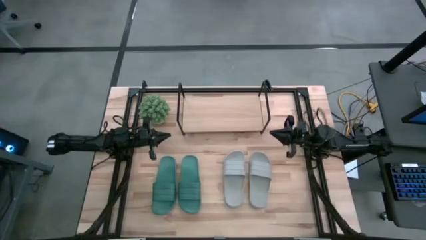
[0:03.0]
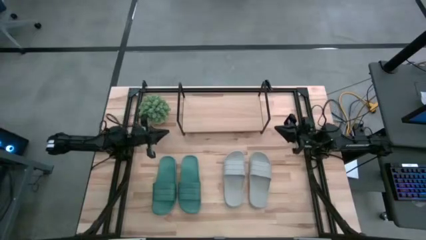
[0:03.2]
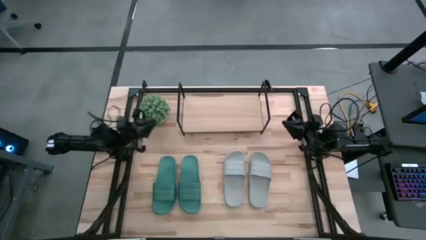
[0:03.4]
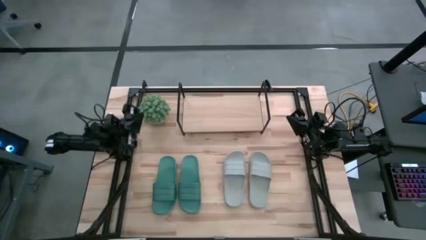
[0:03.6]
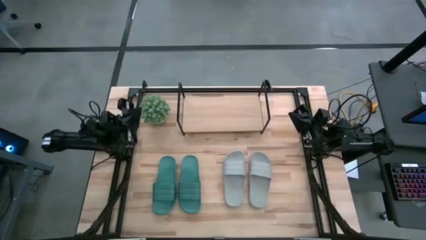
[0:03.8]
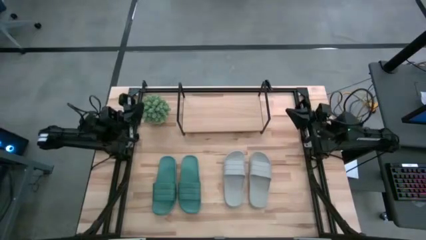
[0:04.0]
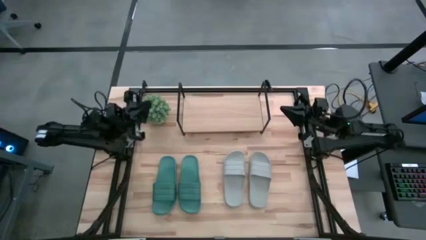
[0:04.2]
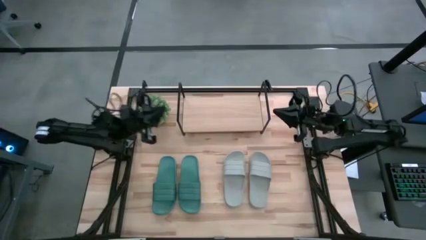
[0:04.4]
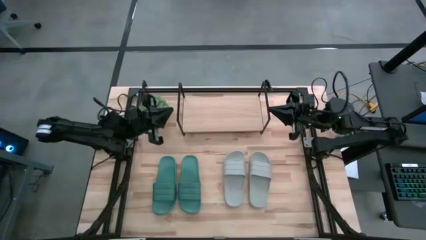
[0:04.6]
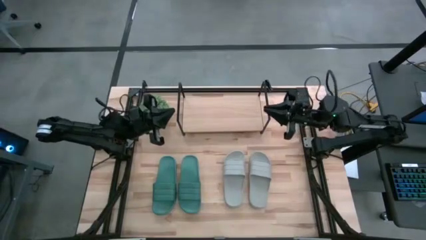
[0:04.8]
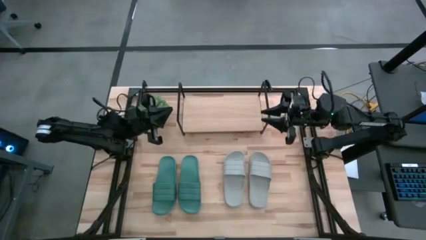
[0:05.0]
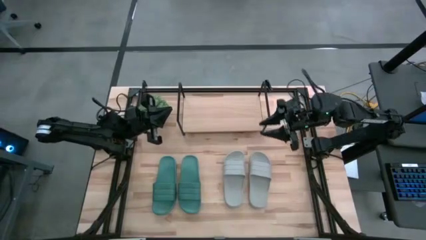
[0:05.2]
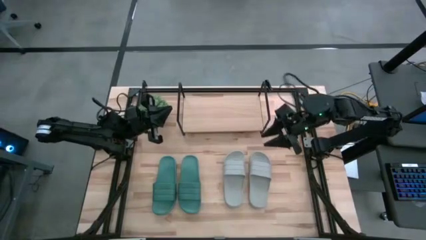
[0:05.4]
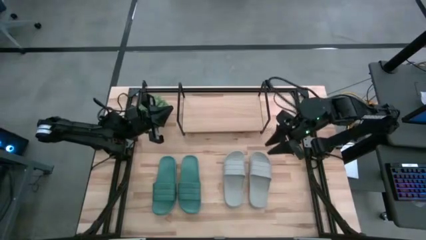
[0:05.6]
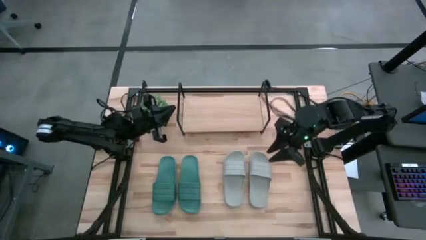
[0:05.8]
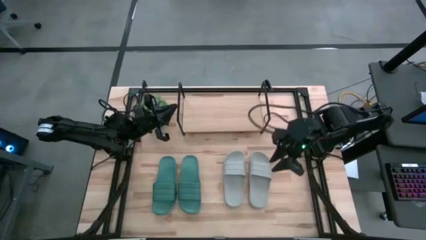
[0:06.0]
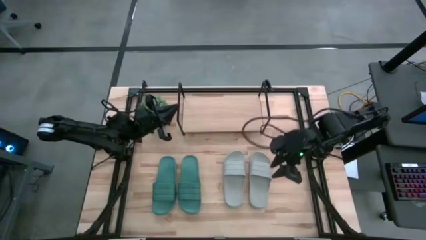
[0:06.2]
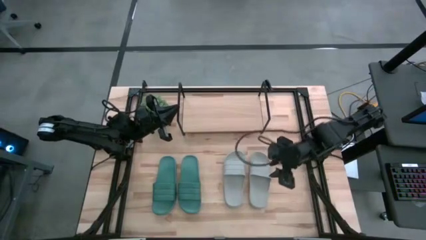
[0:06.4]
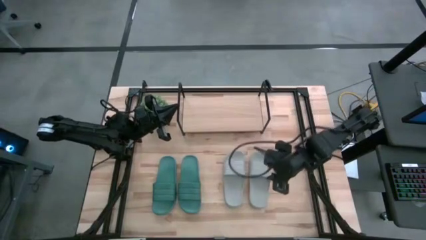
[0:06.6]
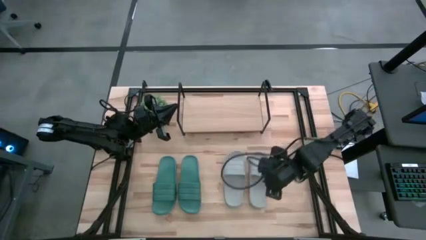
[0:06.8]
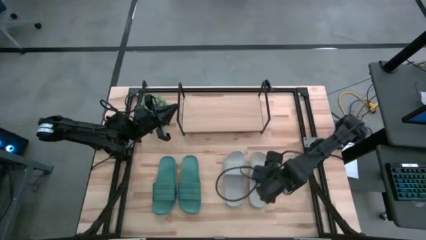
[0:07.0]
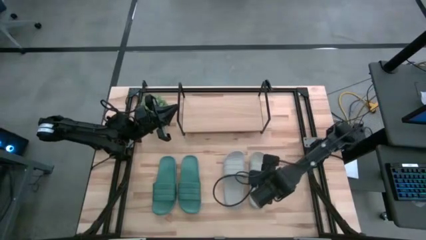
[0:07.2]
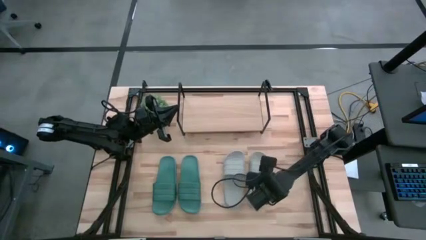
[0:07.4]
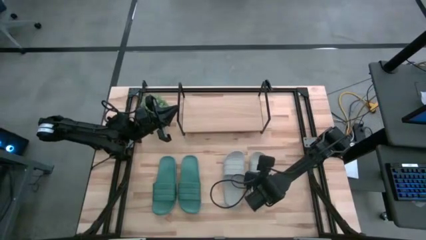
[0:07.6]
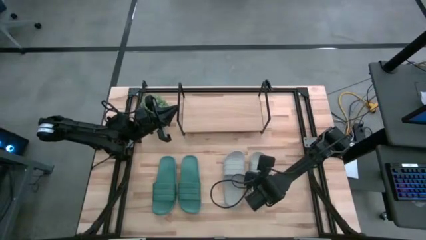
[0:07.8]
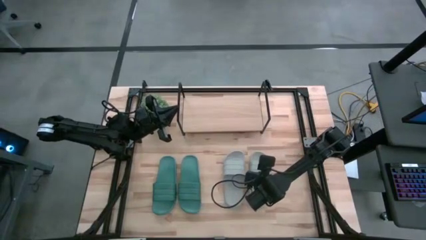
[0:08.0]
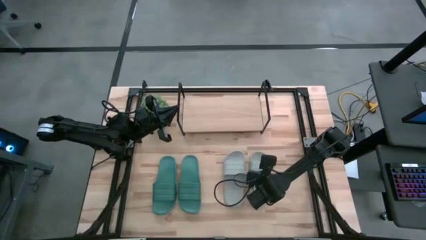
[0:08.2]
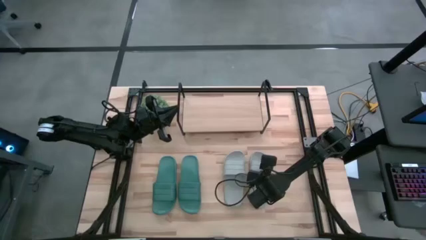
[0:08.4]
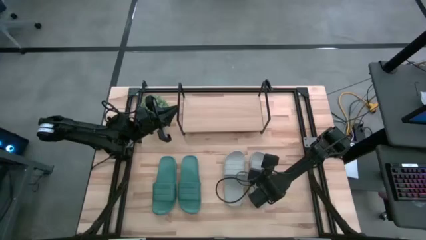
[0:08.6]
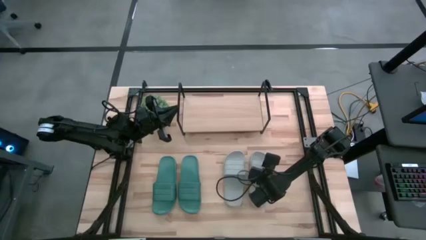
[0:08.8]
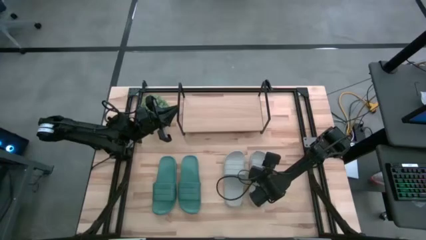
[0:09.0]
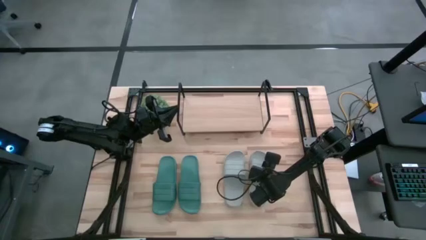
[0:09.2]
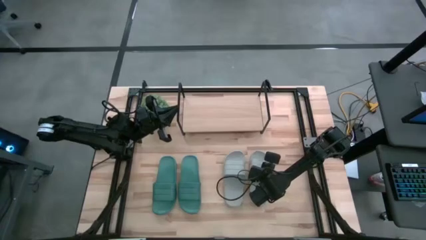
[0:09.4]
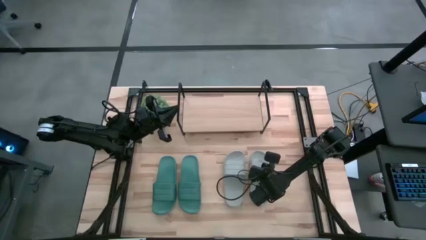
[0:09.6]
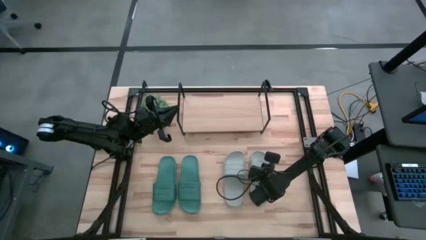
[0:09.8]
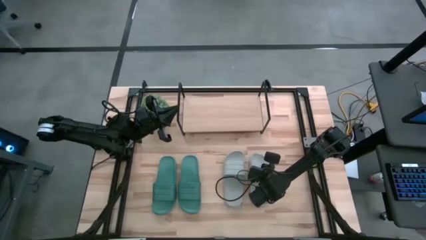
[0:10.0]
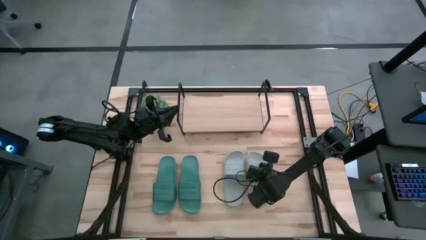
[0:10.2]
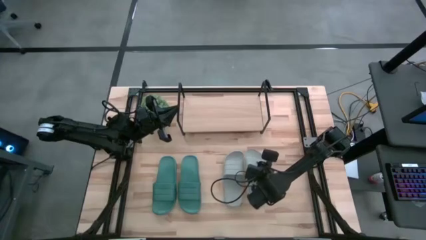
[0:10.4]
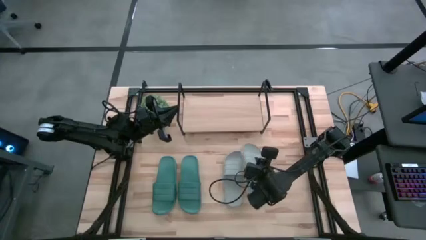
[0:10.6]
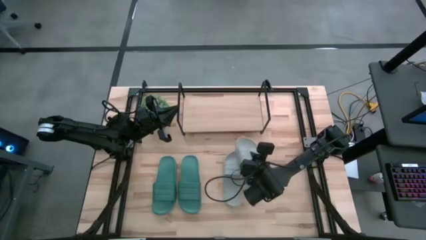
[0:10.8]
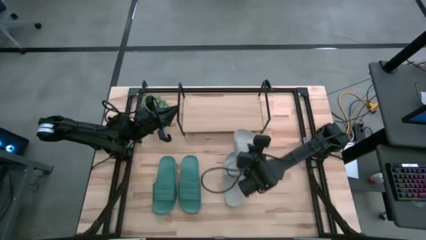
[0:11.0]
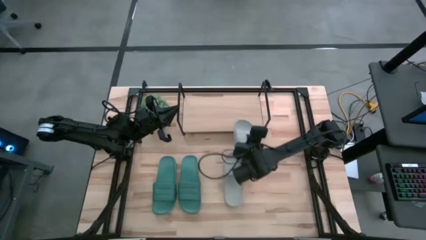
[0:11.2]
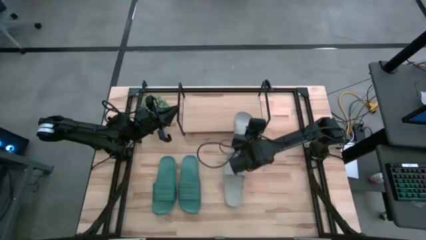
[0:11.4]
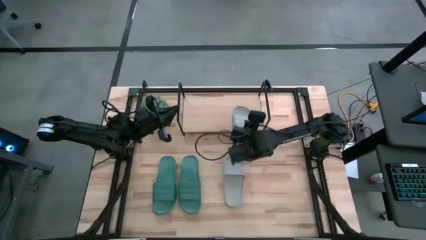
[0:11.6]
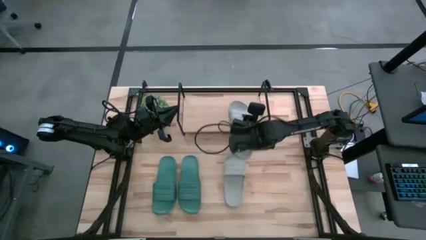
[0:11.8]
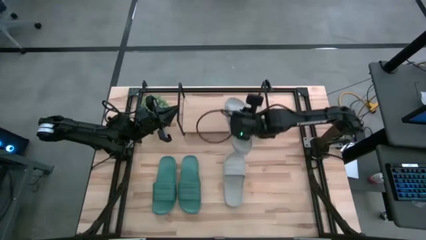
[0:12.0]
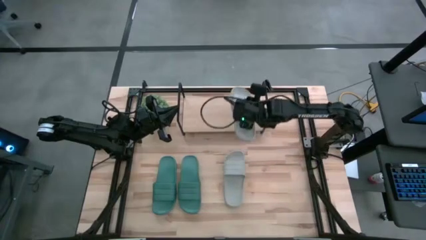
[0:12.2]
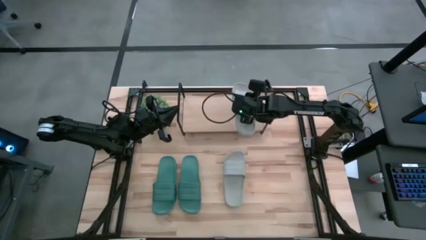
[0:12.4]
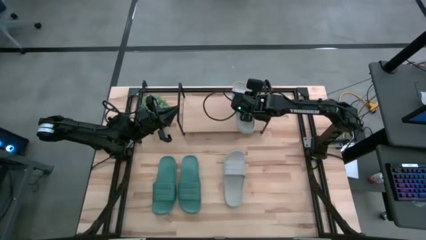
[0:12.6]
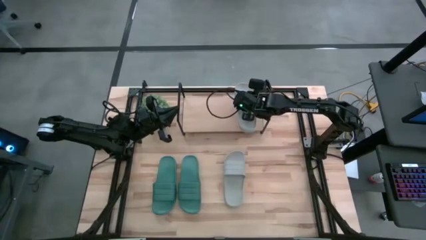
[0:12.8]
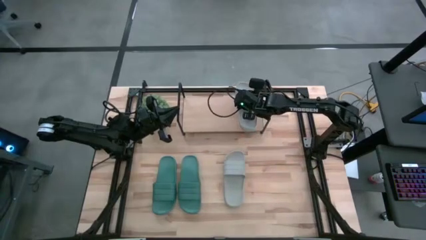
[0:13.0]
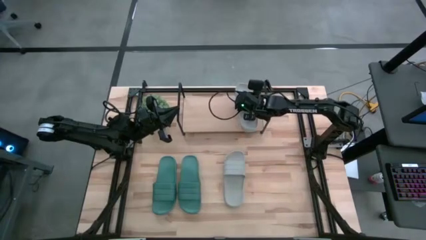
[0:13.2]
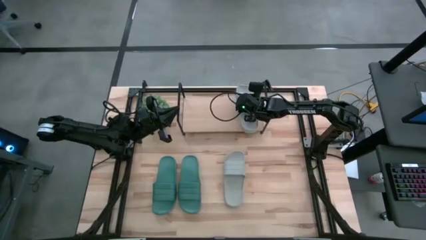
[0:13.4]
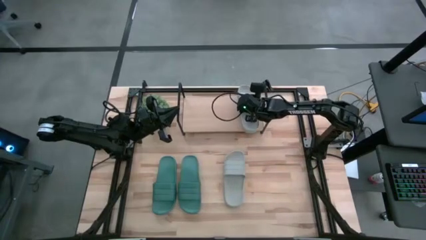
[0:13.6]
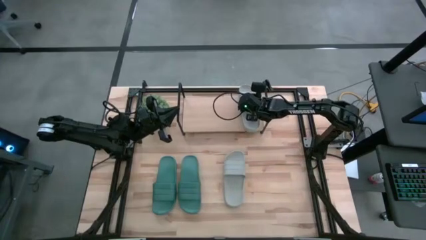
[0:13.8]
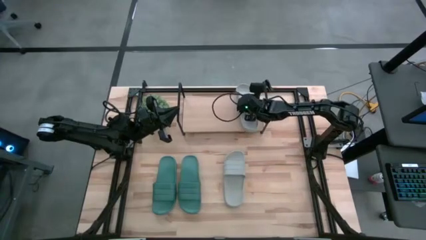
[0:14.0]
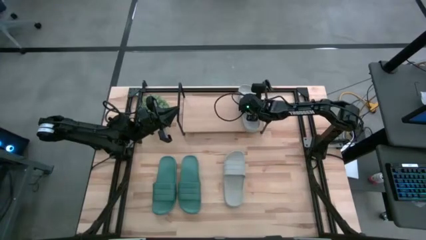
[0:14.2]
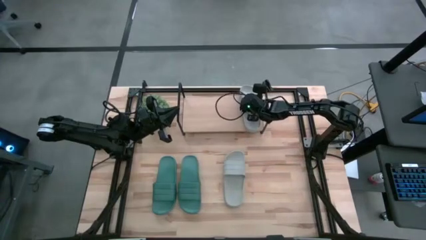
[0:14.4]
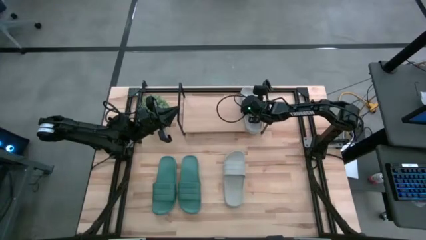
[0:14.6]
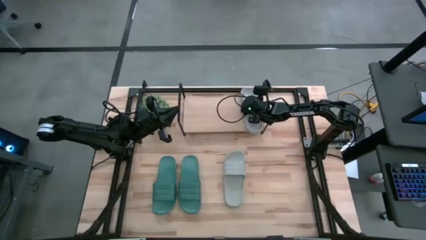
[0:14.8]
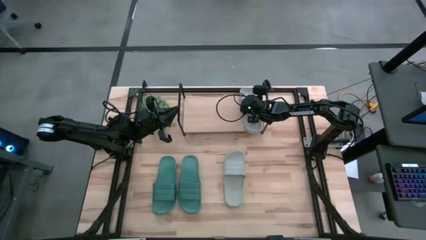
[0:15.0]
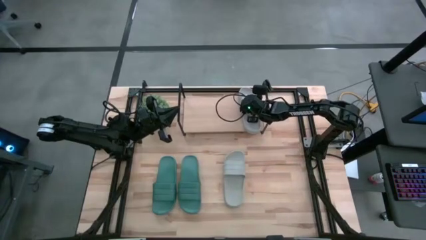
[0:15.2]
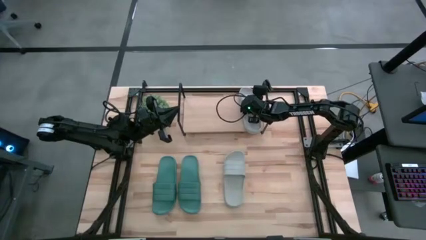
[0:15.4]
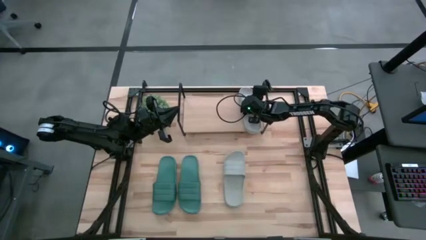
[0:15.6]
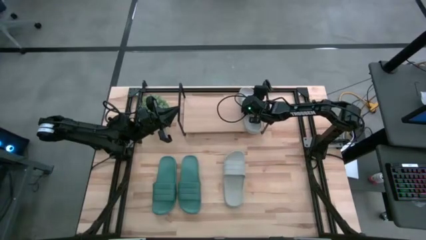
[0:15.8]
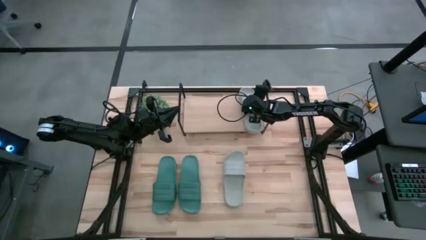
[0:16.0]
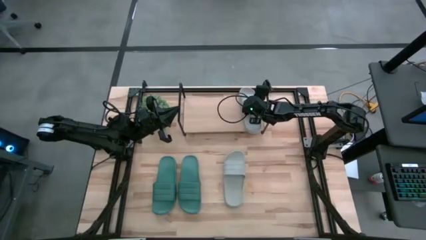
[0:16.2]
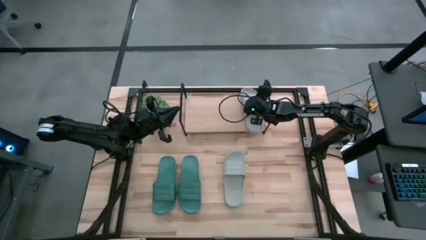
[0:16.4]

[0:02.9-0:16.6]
Task: Pick and place slides into the shelf
Put the right gray slide on the shelf
